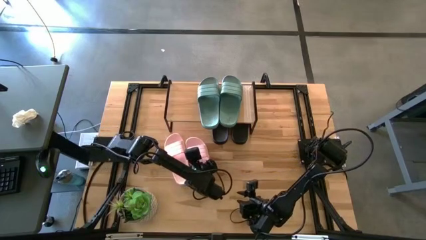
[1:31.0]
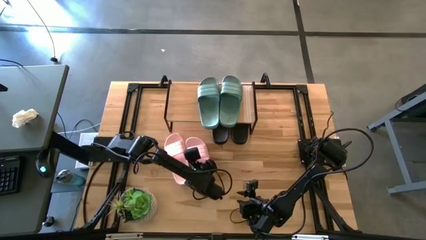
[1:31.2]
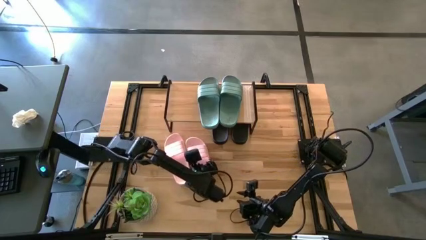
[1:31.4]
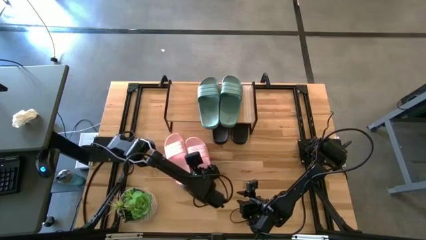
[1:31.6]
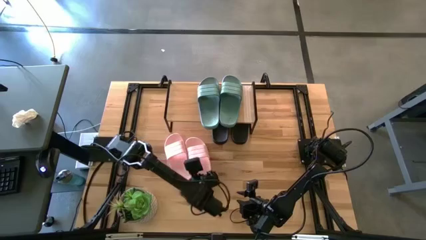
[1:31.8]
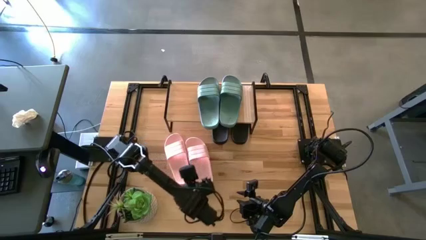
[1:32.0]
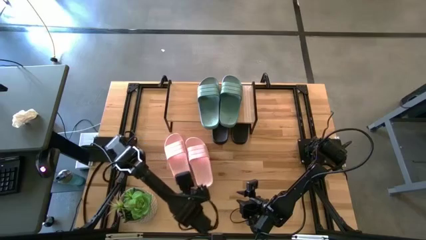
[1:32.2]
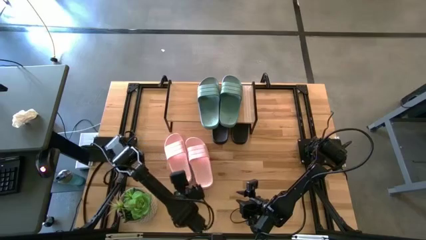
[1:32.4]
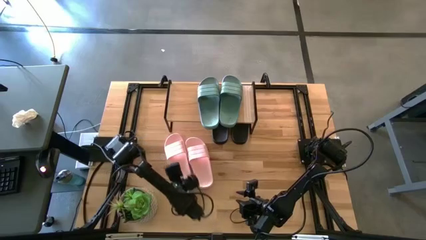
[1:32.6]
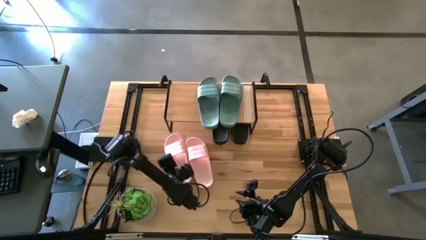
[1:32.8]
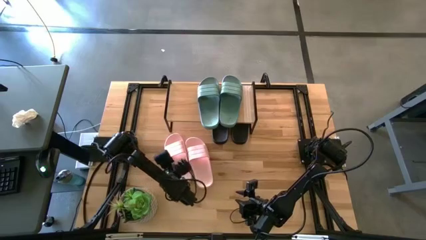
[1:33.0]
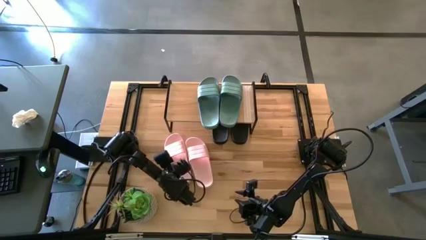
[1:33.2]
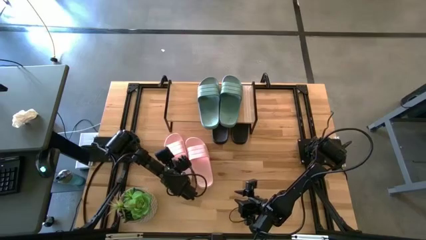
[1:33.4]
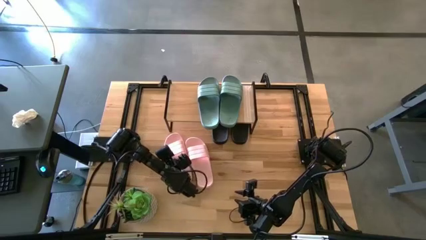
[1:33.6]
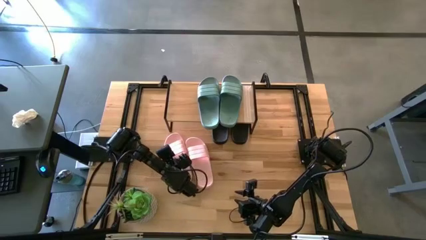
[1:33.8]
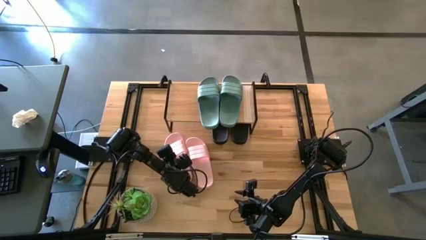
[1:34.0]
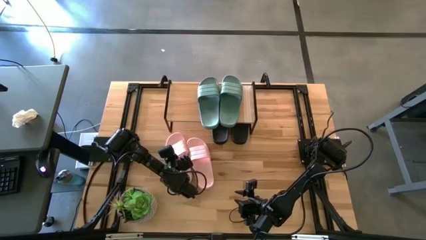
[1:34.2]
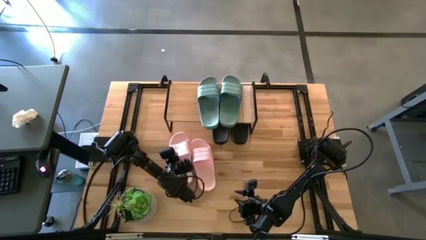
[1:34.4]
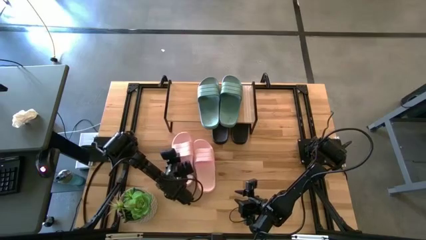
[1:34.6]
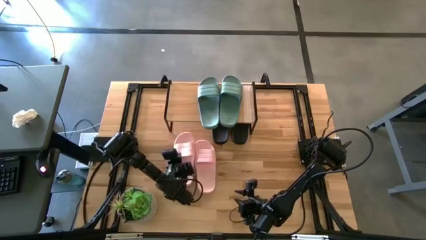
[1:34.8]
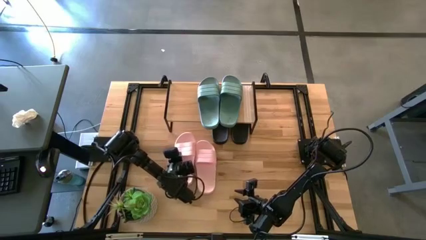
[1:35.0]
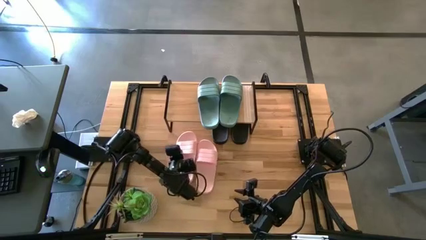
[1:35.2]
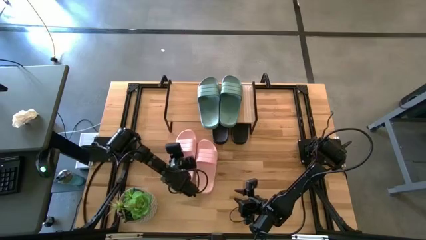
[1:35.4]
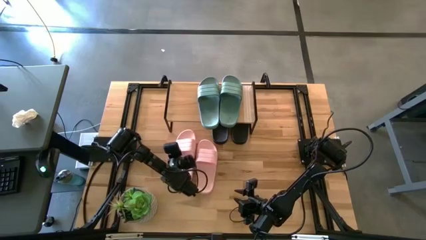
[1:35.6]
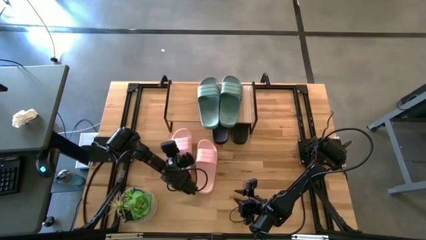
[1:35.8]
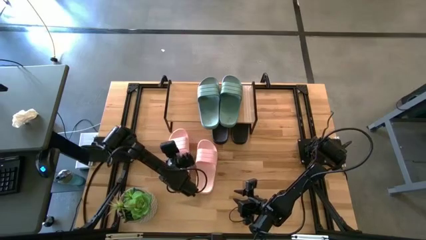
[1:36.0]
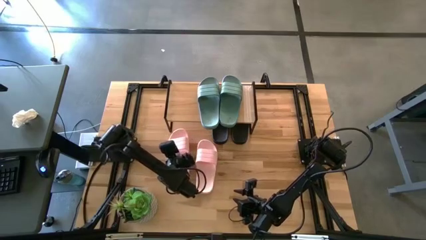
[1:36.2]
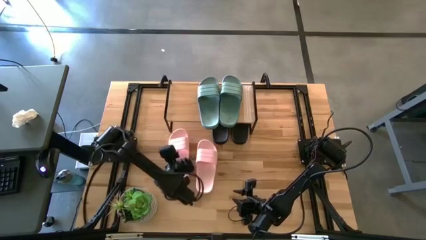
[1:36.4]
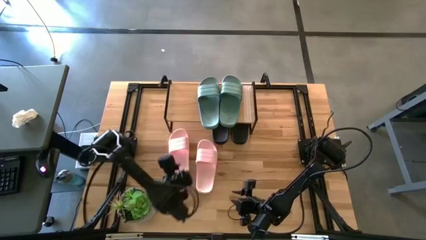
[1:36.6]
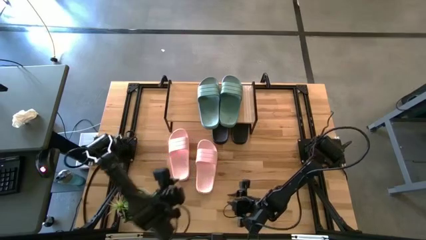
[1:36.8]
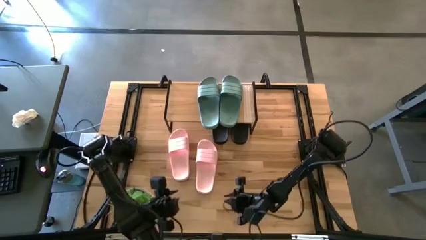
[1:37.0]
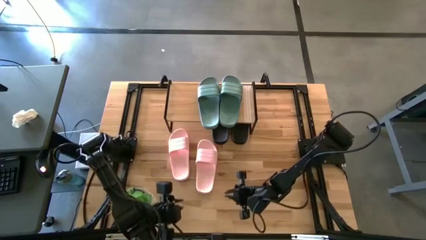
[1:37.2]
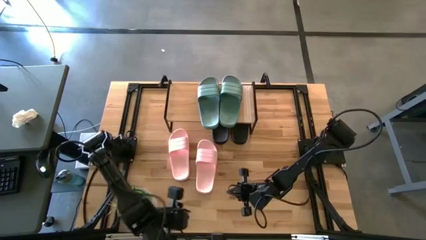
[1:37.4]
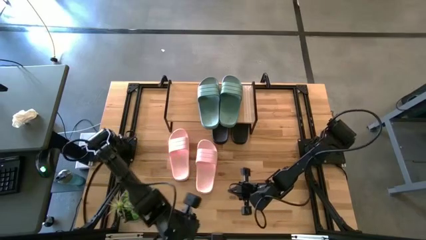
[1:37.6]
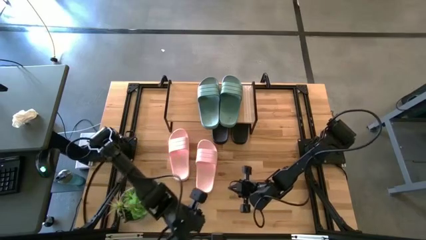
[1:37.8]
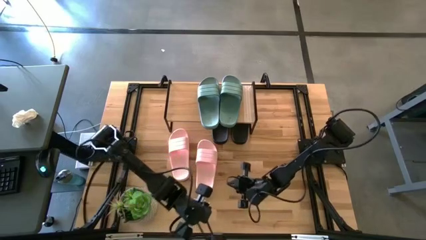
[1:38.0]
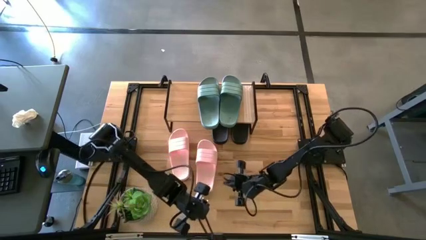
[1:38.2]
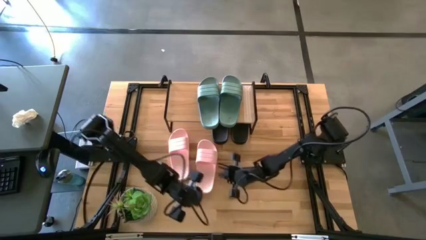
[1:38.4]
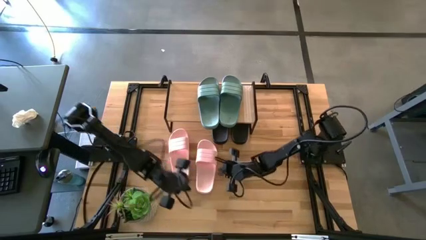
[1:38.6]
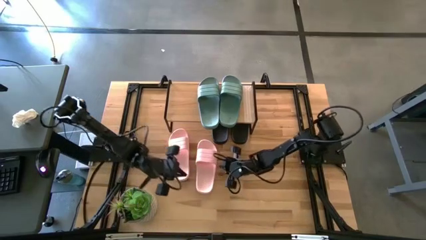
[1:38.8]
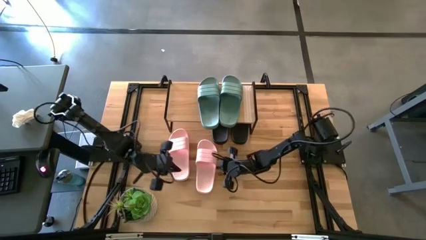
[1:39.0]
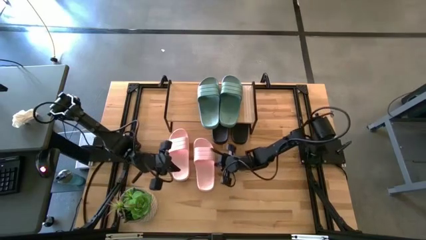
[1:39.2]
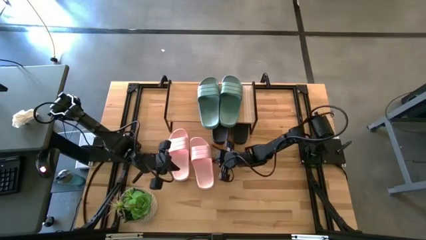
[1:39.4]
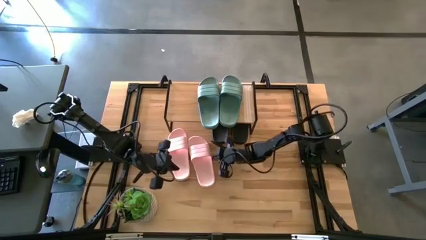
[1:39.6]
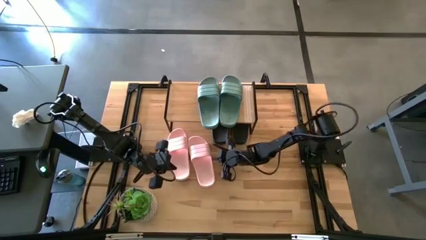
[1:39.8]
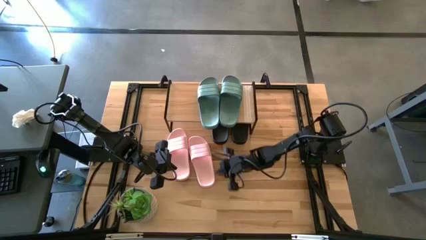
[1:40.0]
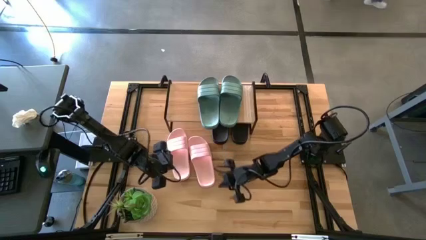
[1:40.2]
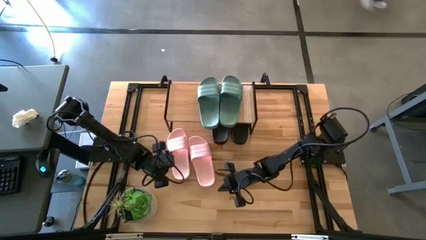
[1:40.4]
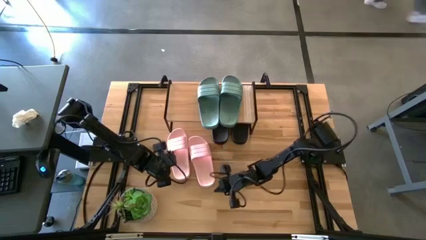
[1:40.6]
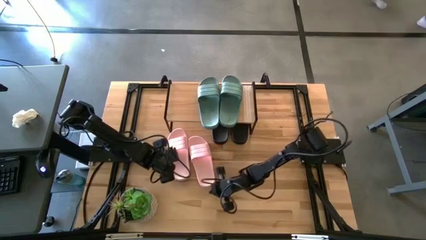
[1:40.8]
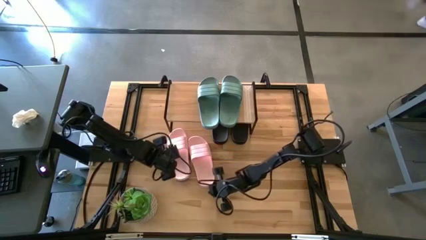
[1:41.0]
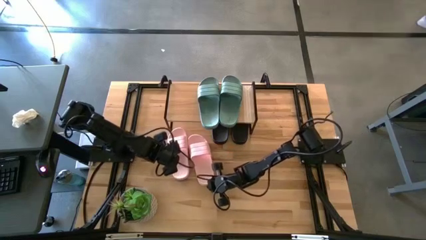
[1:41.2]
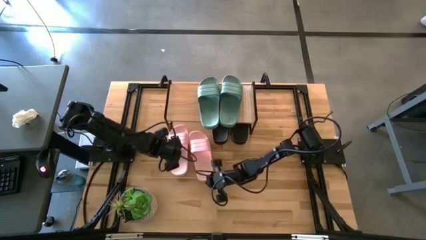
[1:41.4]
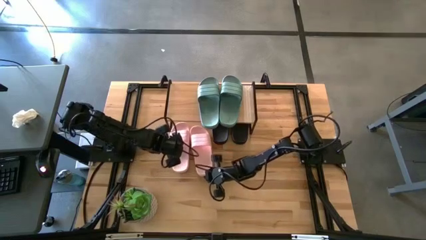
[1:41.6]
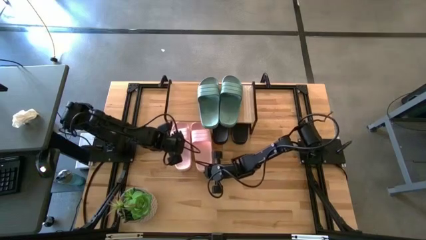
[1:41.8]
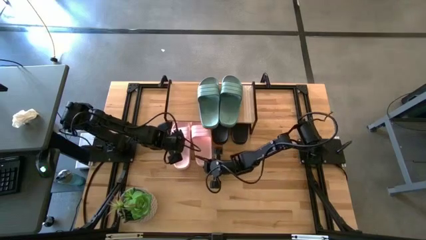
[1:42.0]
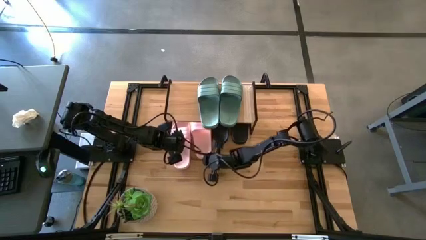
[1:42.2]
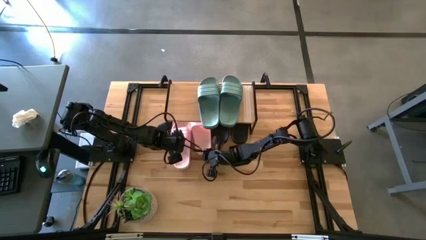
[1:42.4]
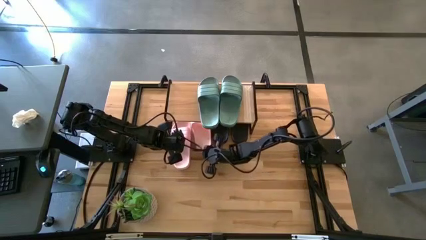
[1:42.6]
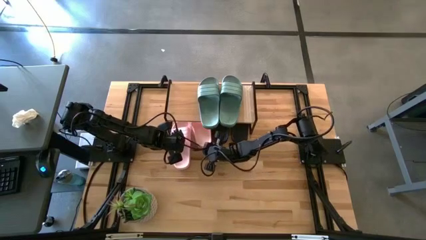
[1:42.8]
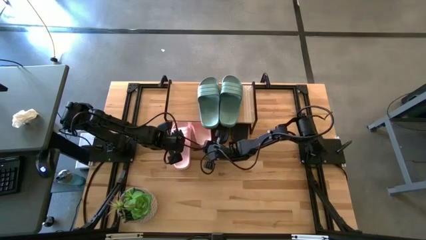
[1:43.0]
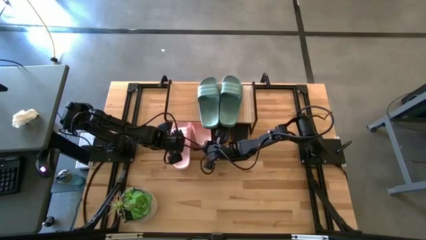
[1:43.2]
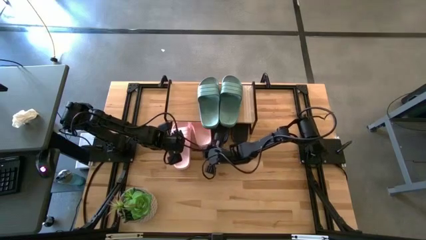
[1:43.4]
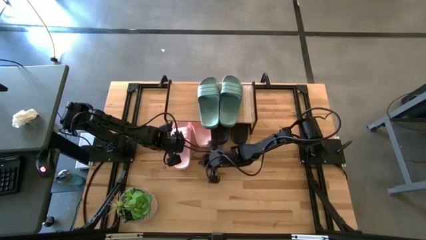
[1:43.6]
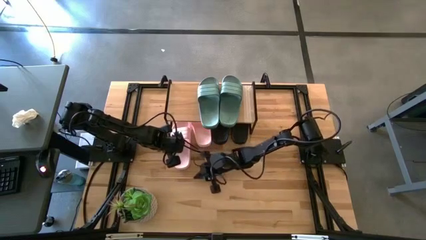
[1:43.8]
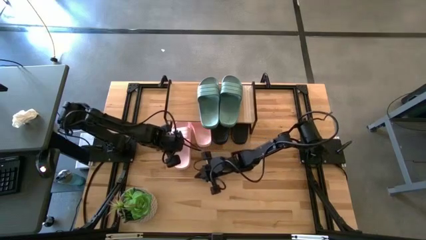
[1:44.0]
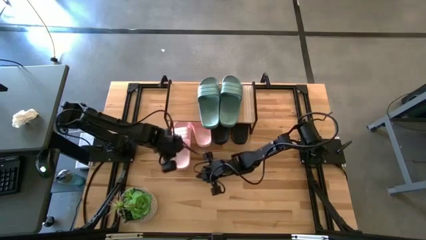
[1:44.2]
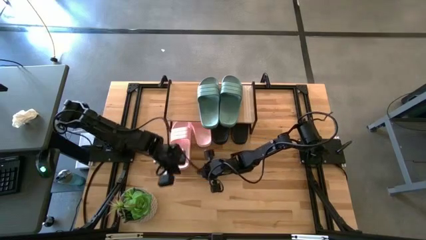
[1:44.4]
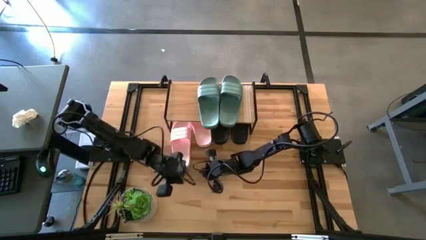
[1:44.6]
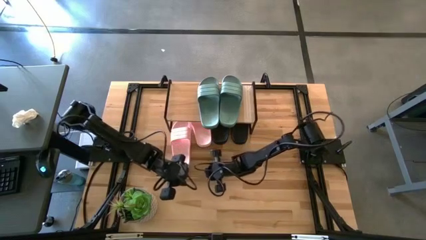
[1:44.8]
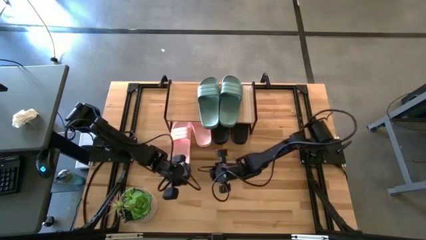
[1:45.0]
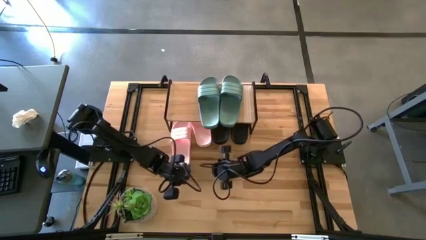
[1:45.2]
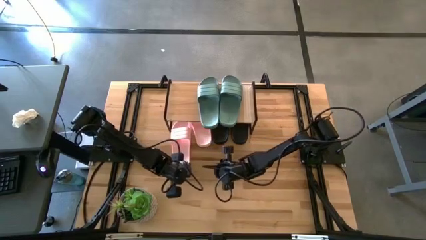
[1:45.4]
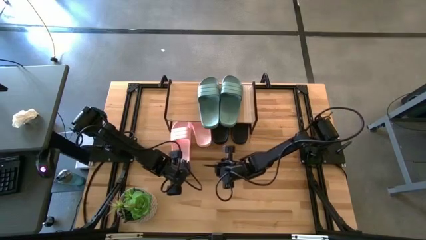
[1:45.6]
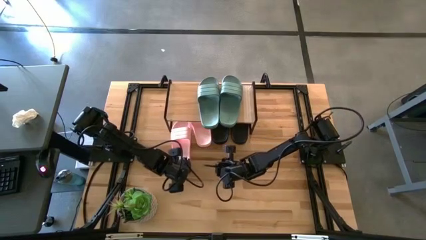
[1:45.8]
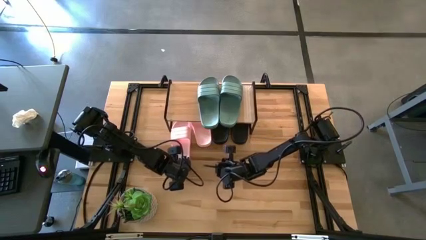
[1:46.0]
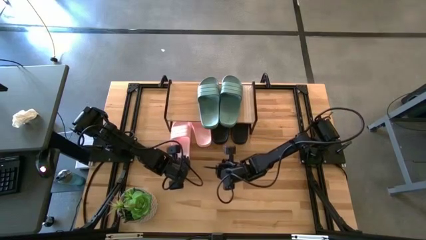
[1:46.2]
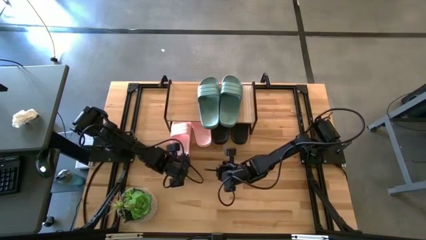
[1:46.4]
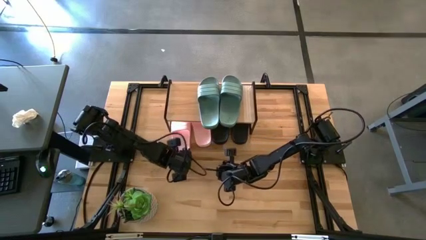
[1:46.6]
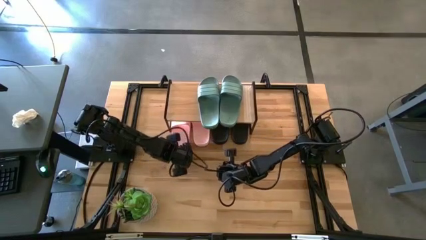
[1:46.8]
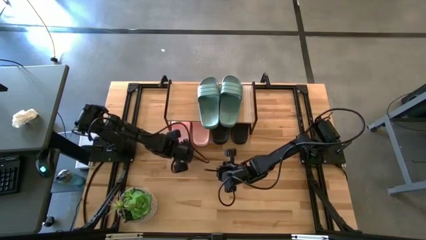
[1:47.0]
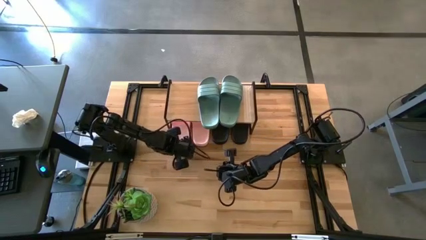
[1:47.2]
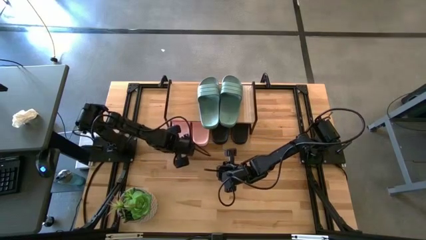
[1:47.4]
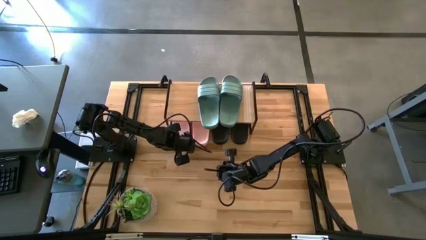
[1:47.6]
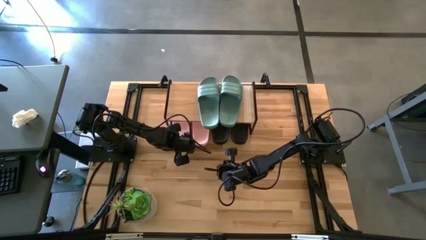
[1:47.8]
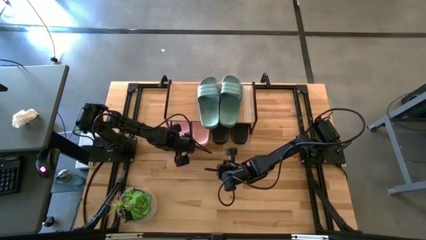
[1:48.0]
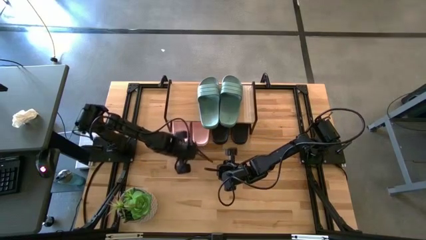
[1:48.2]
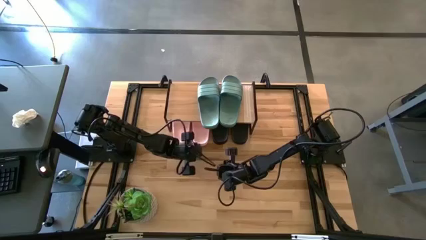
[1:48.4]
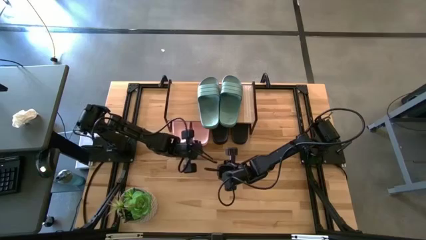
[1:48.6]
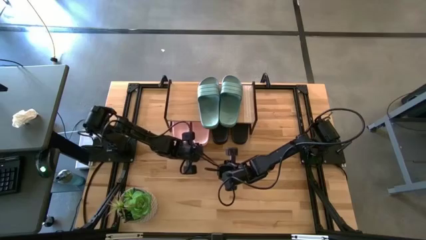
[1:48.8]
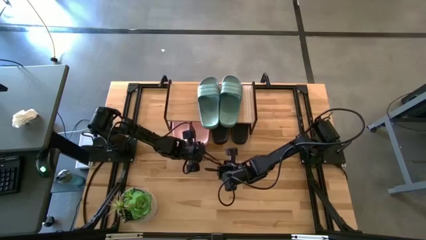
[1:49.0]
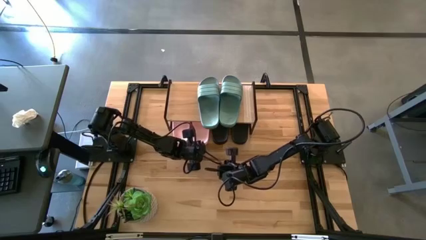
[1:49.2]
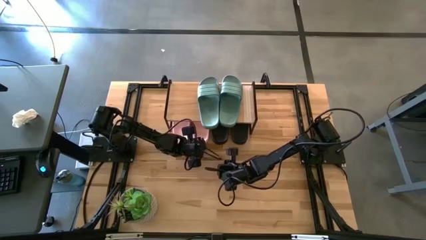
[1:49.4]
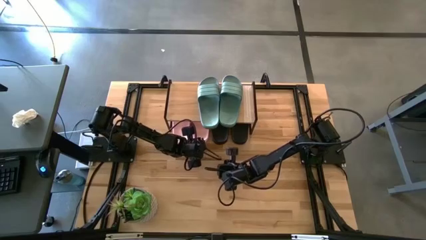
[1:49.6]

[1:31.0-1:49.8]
Task: Pick and place slides into the shelf
Put the pink slippers under the shelf
